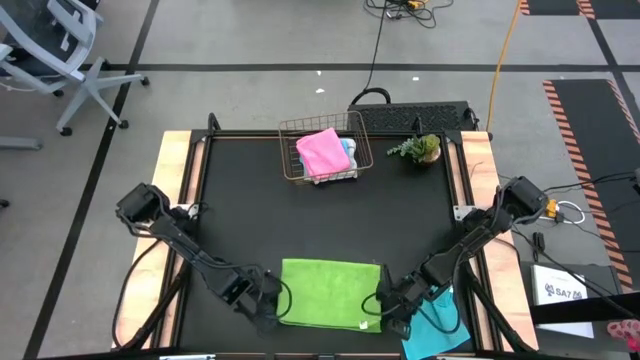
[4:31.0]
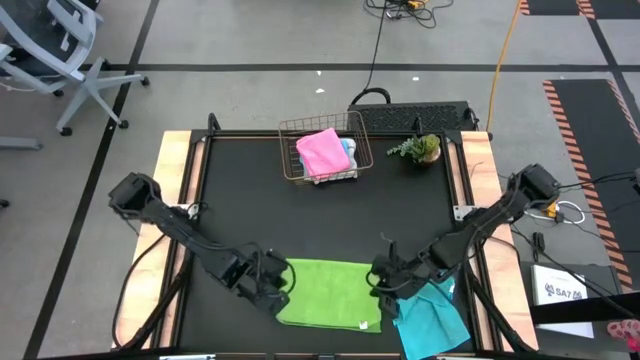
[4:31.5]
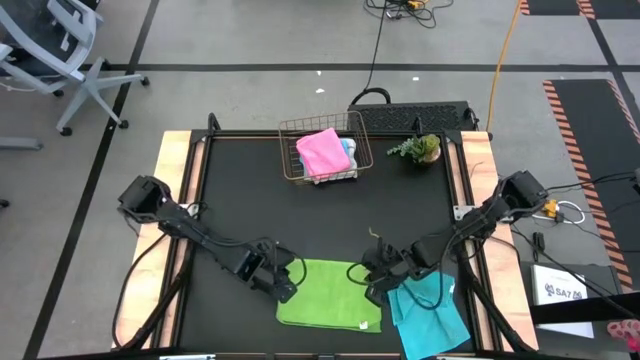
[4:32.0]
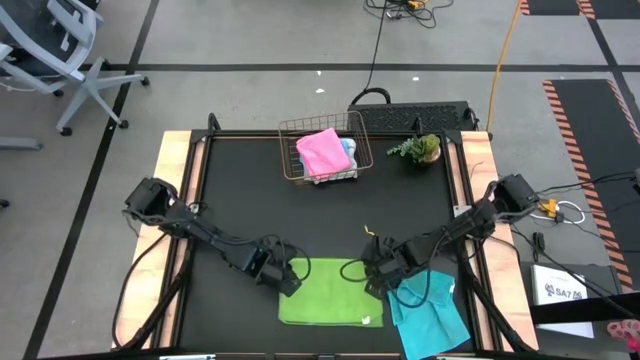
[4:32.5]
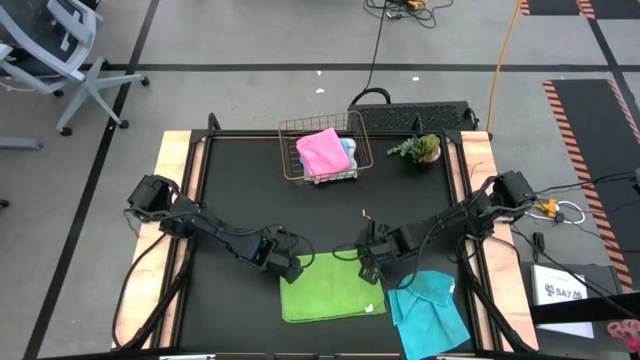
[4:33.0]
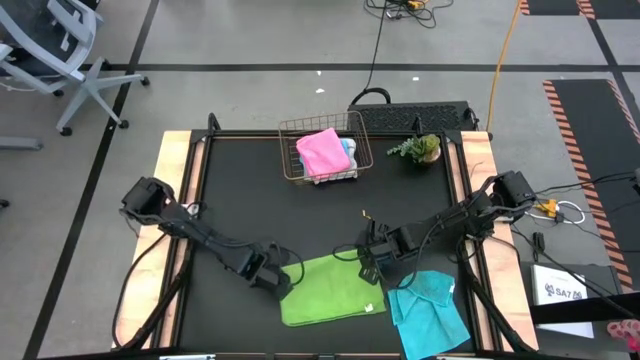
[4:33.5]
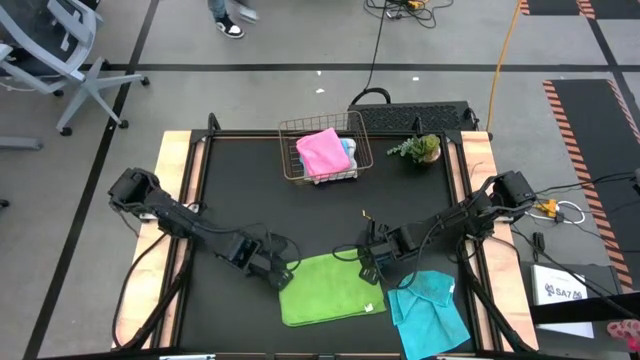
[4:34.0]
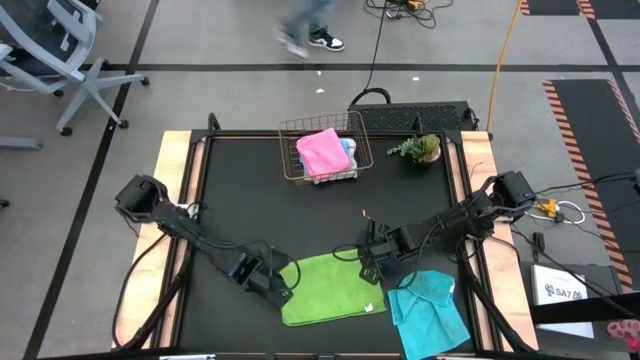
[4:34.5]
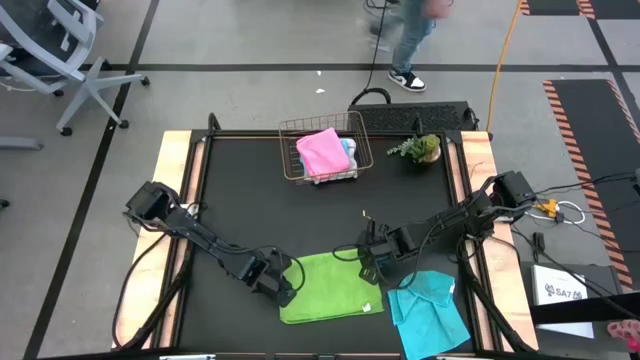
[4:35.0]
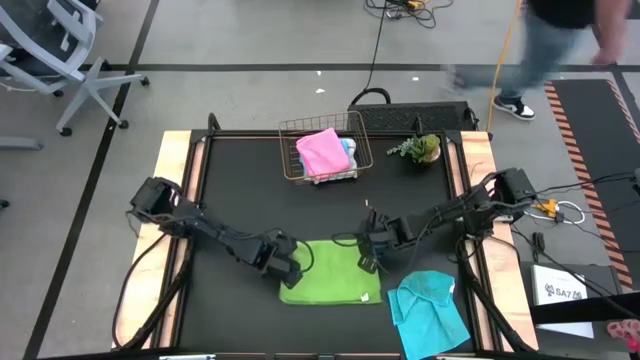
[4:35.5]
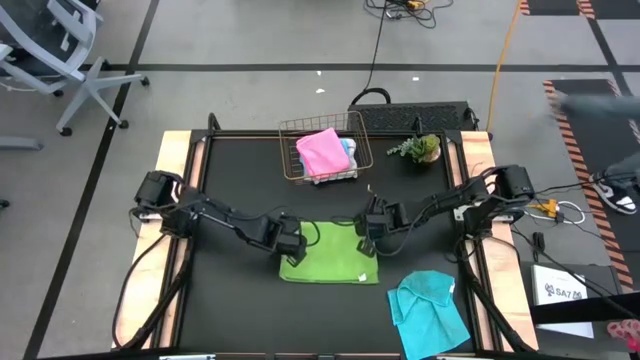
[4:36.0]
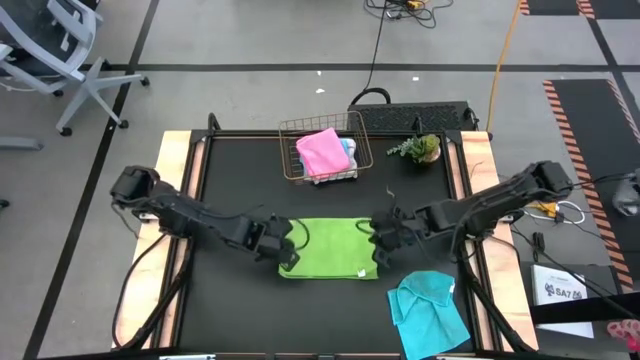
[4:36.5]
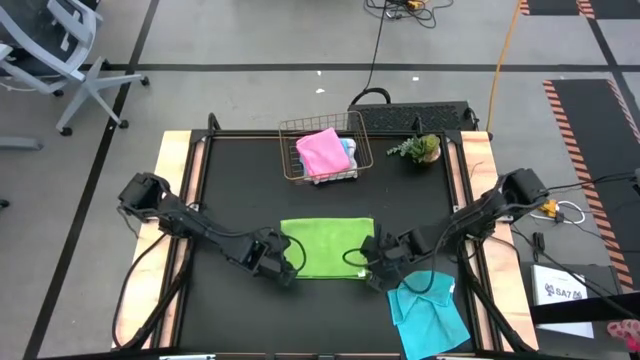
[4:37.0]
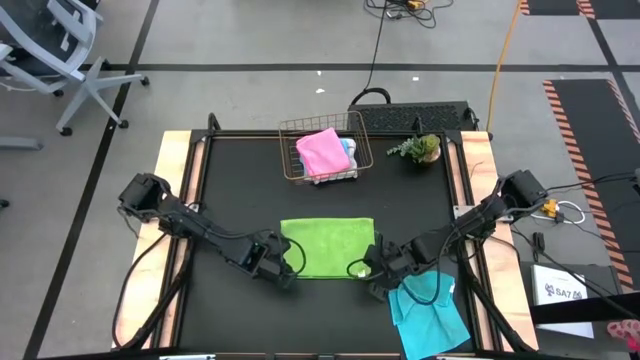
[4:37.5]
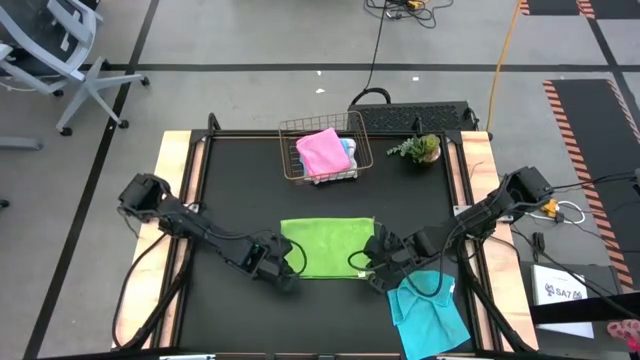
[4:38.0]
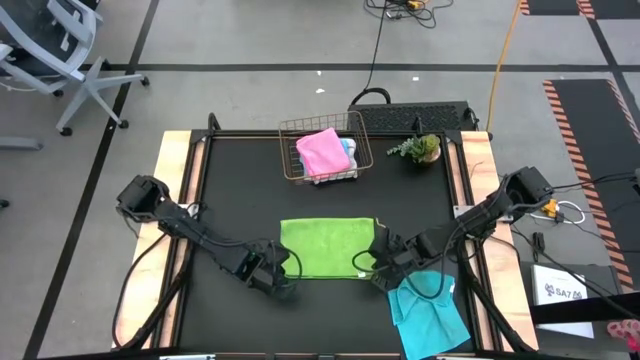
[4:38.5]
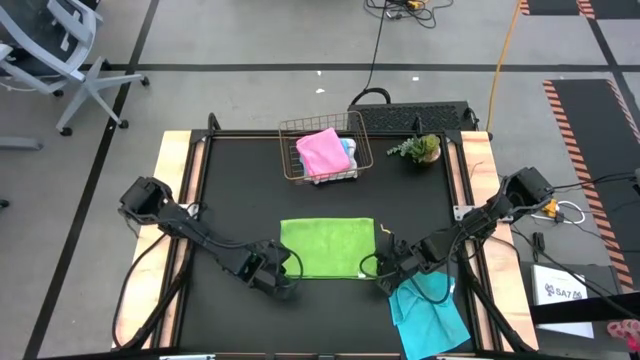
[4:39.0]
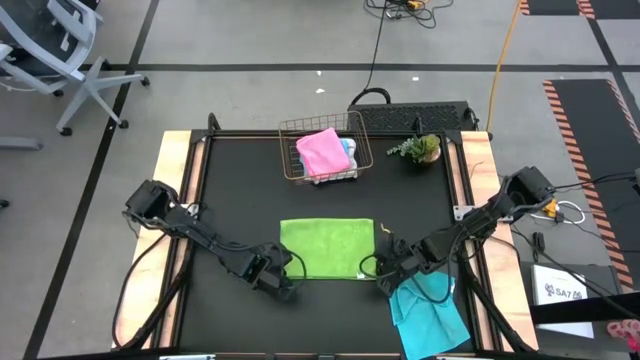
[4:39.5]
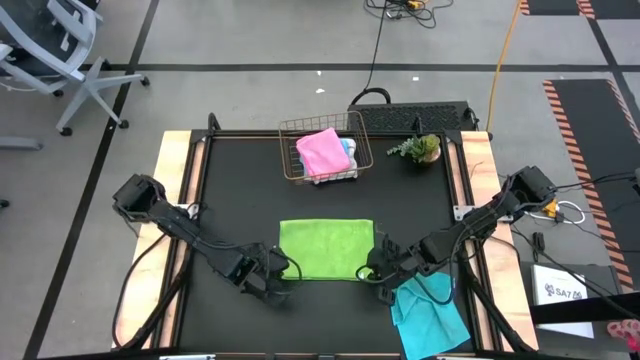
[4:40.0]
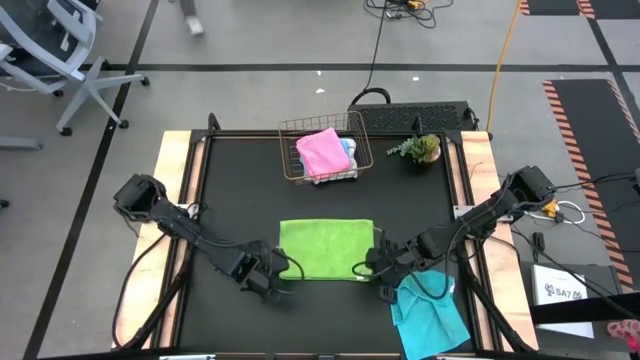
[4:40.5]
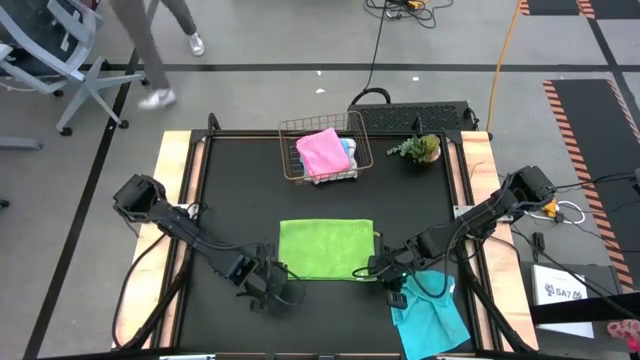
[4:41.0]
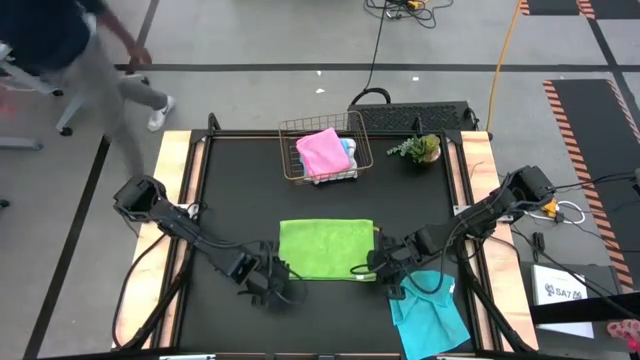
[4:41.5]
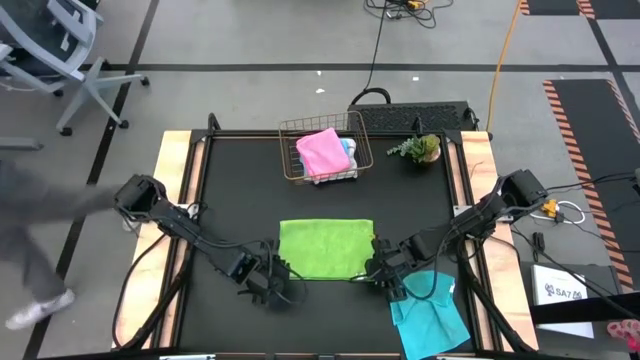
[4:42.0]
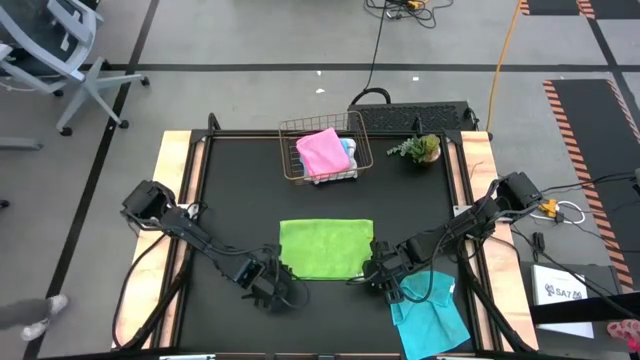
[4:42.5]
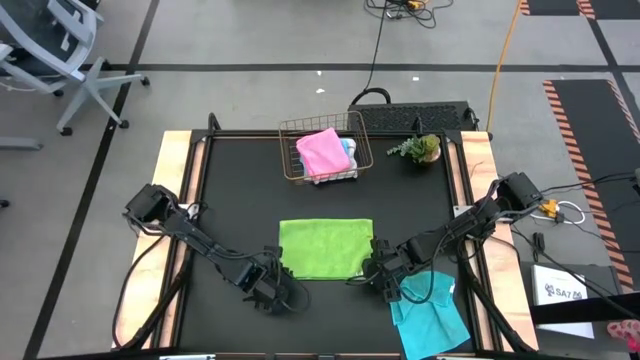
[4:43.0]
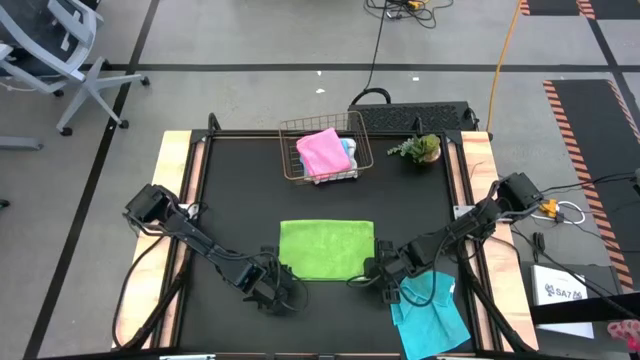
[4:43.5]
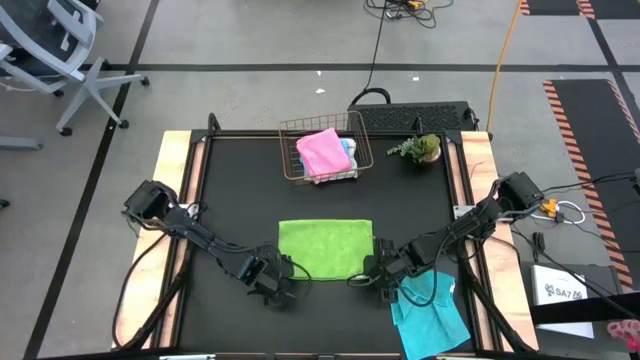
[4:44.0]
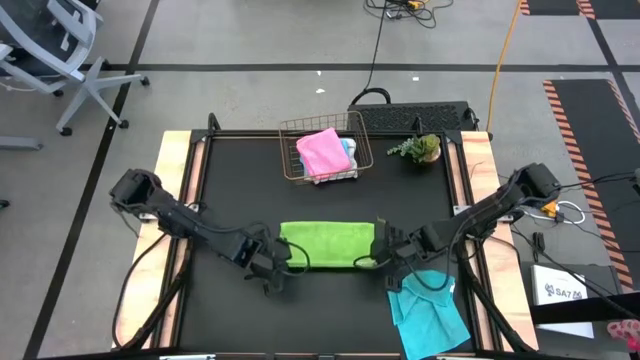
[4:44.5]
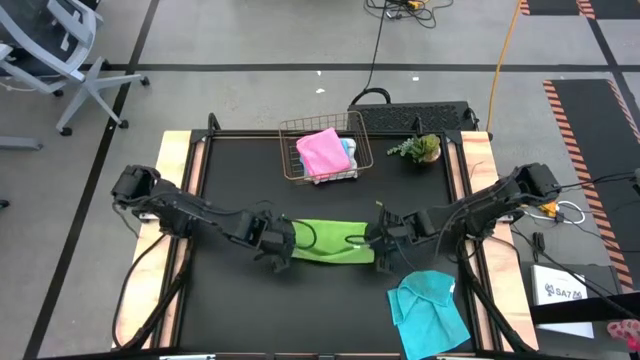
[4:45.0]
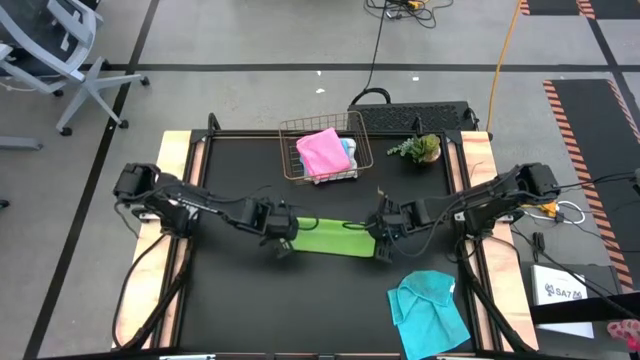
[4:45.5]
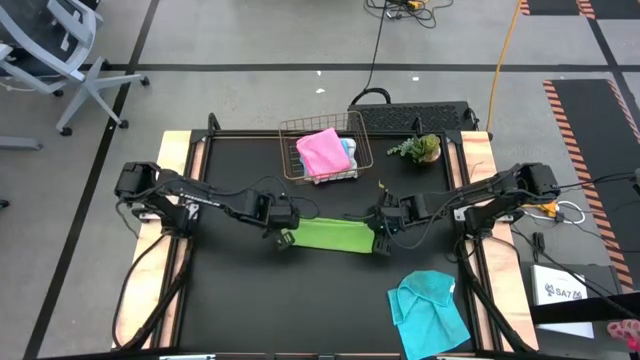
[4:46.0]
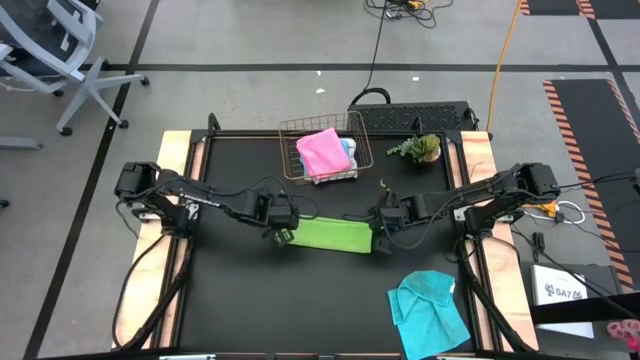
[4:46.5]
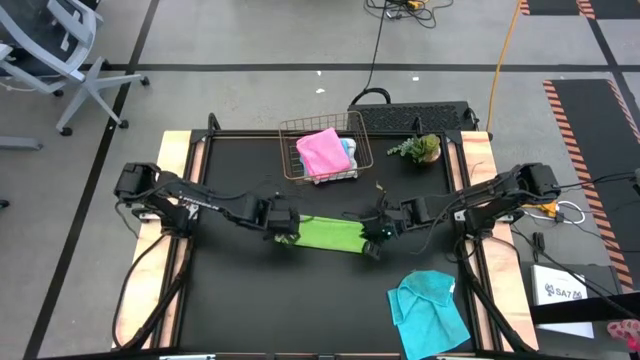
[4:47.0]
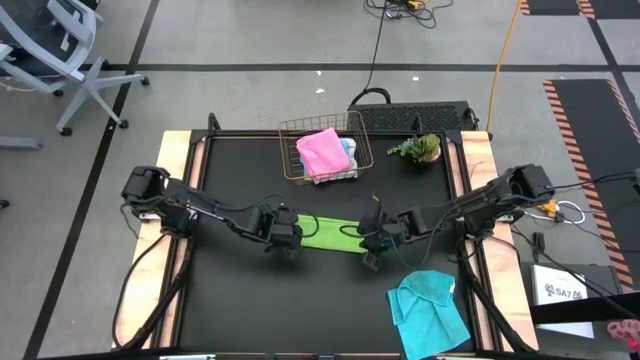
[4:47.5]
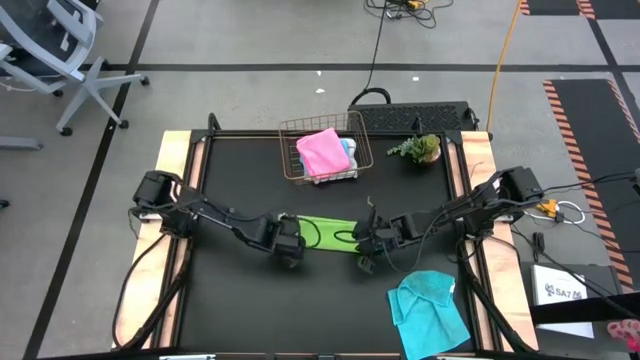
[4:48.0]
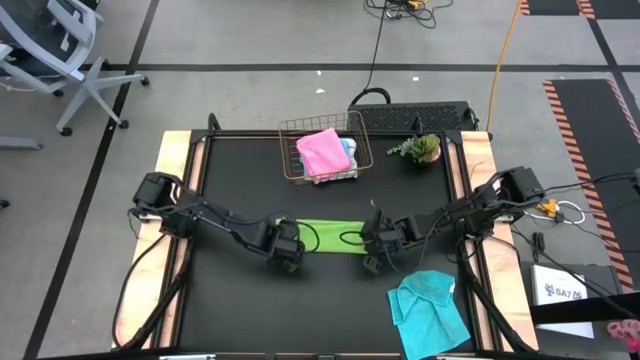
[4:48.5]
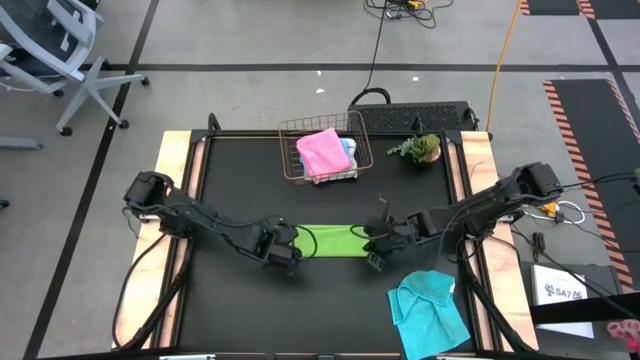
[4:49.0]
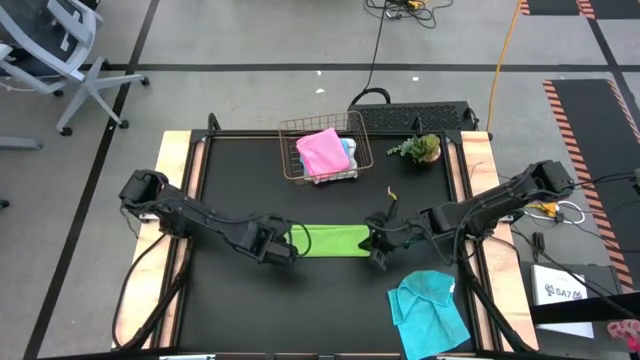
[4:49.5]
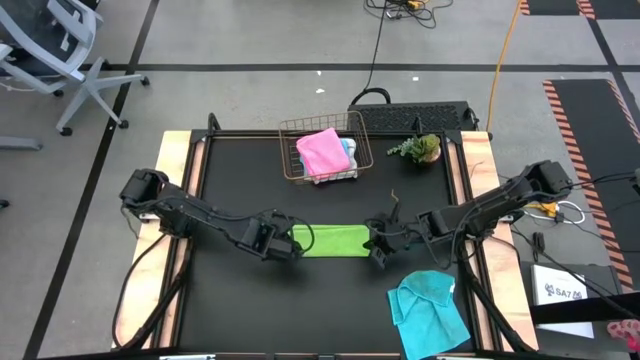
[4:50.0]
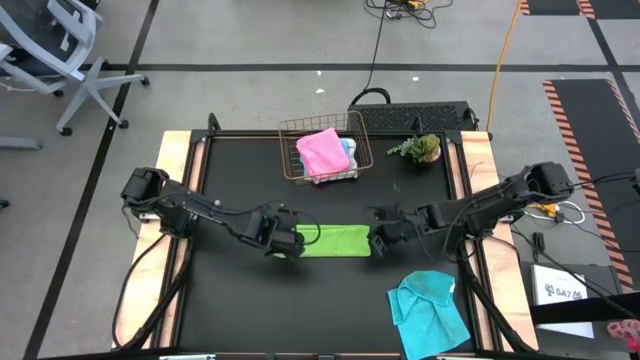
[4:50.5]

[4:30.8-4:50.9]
Task: Fold microfiber towels
Fold the green microfiber cloth

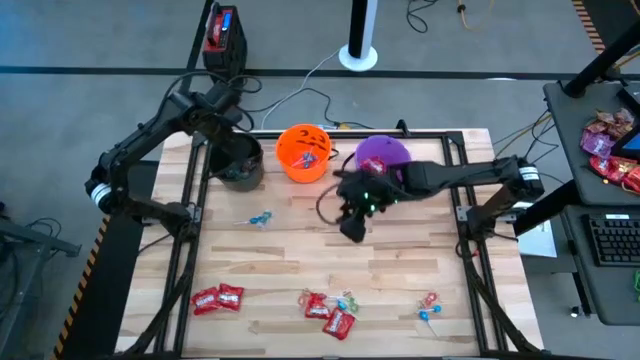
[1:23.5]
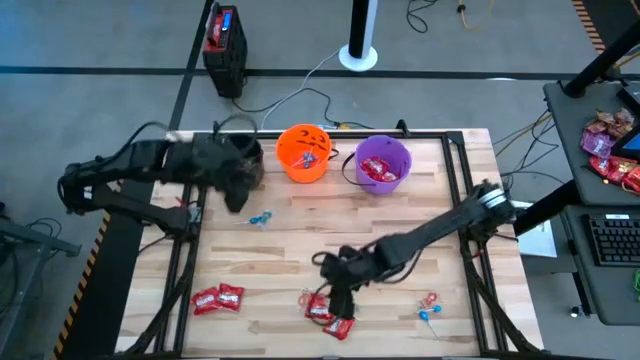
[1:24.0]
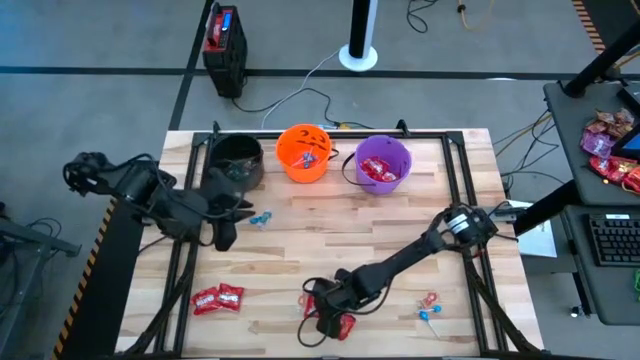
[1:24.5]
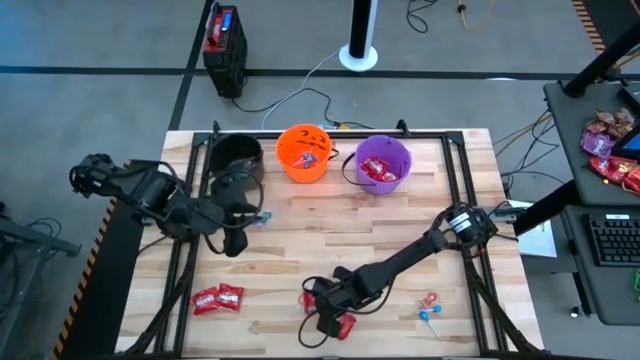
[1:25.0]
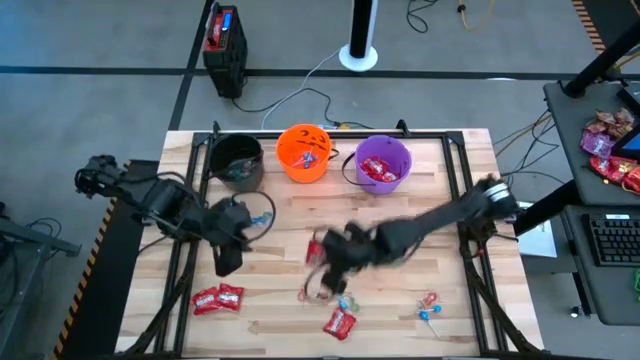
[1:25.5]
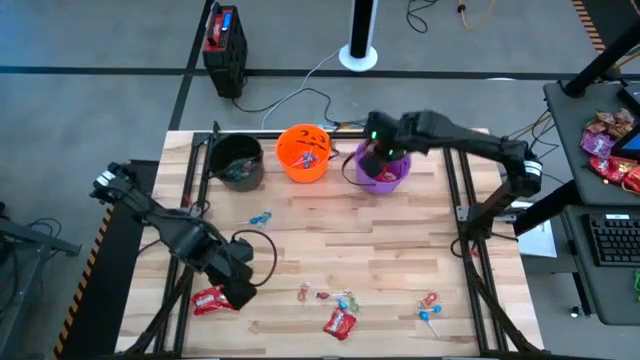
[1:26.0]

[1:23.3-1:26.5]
Task: Sort candy by brand, put in halloween buckets
Put the red candy into the violet bucket
